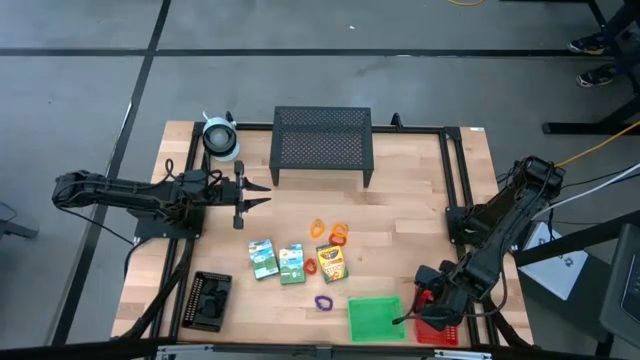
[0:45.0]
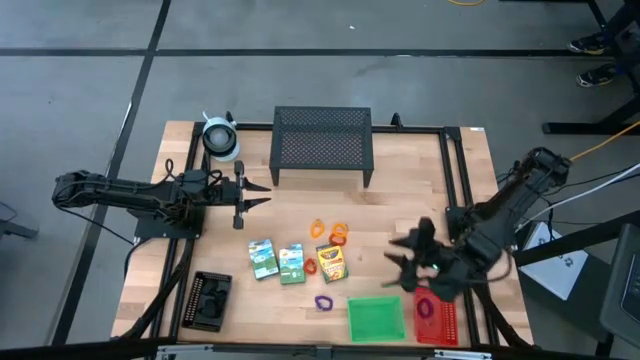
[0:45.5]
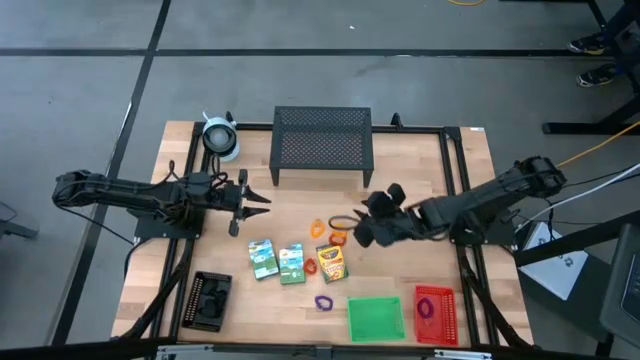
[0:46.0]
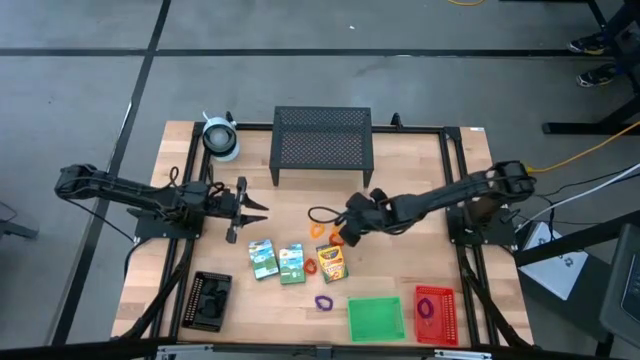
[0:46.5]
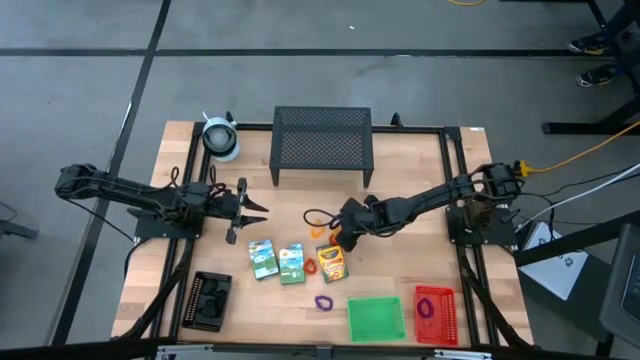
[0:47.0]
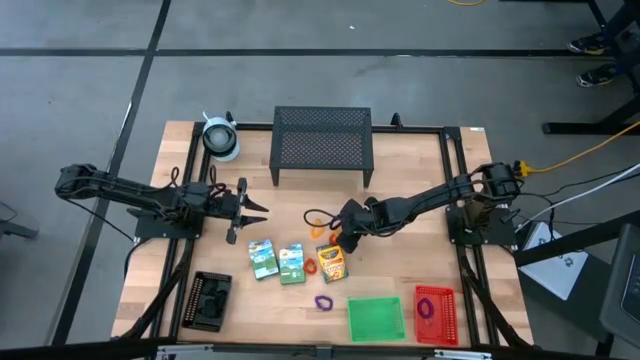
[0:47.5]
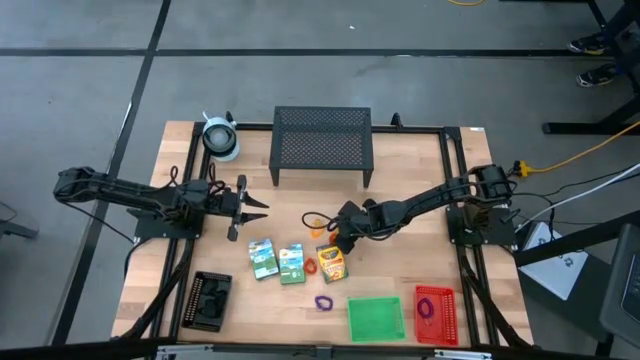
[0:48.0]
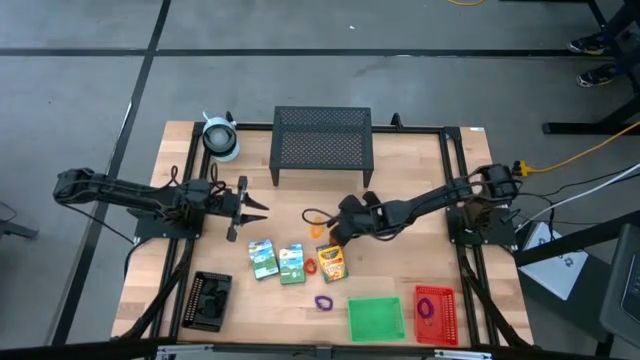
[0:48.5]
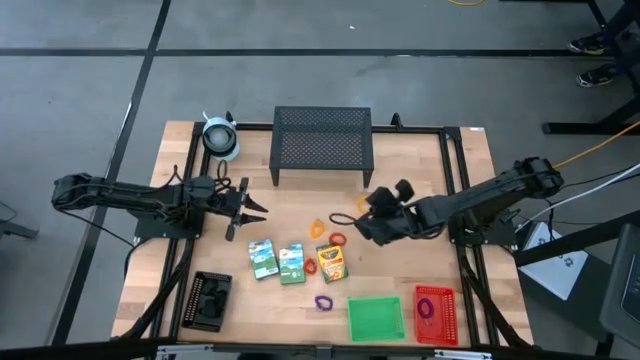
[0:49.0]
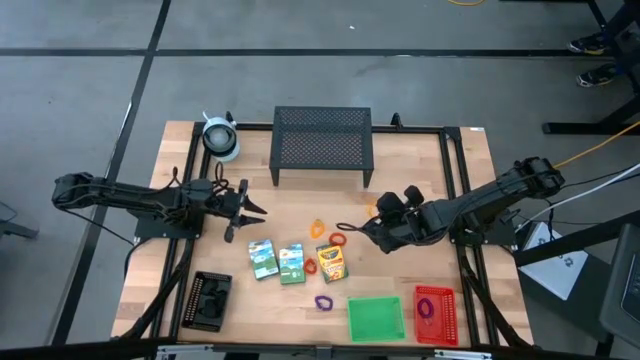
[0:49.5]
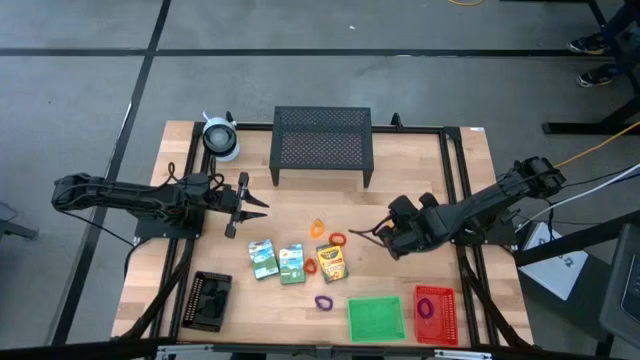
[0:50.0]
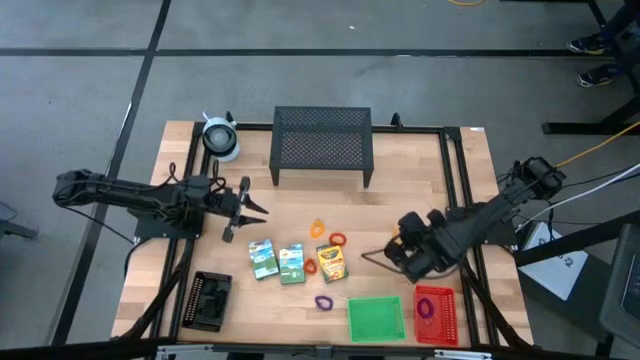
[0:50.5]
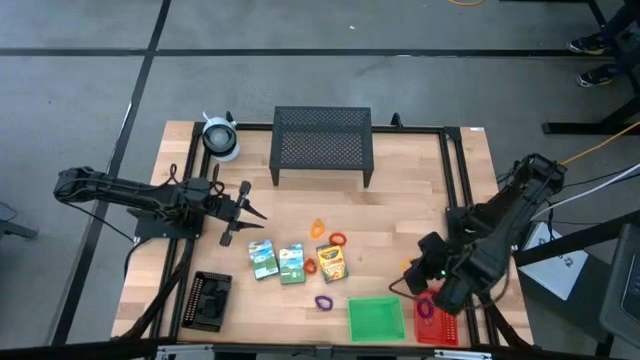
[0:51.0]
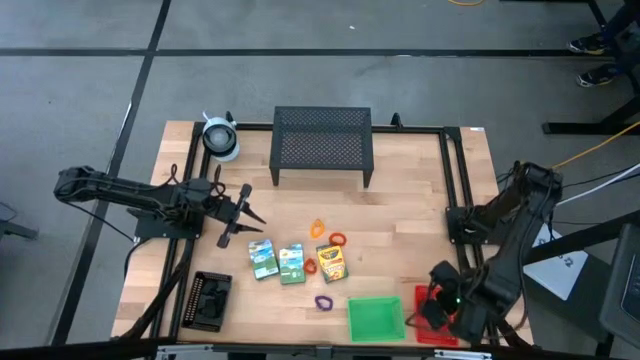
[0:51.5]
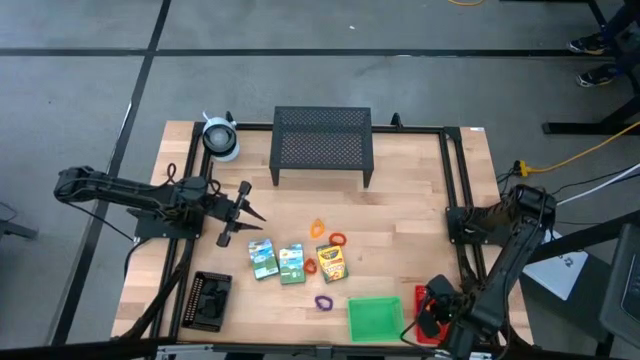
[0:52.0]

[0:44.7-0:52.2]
Task: Pick & Place Office Desk Supplies
Put the yellow spring keychain into the red bin

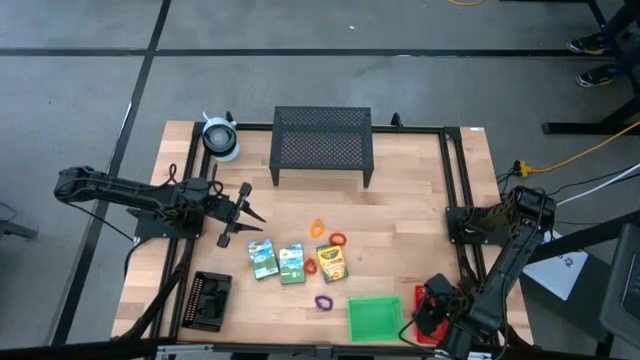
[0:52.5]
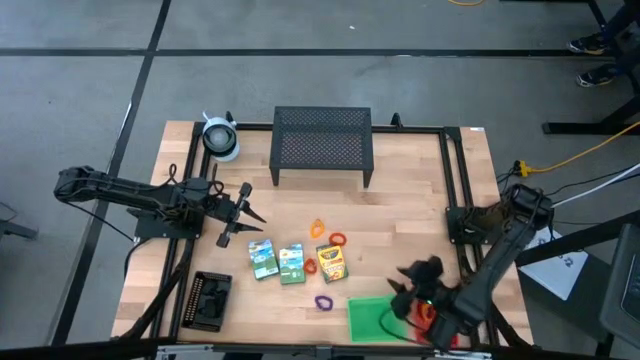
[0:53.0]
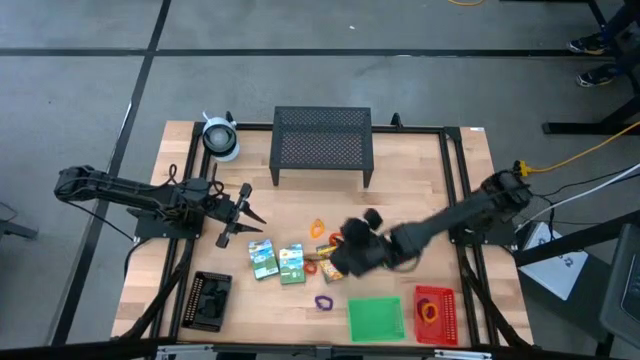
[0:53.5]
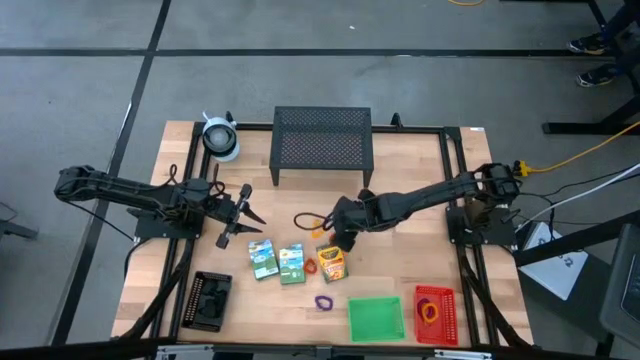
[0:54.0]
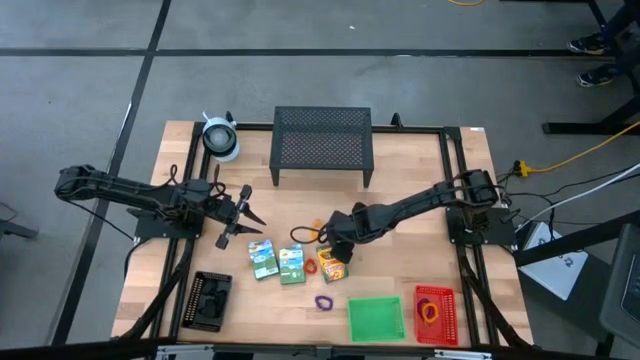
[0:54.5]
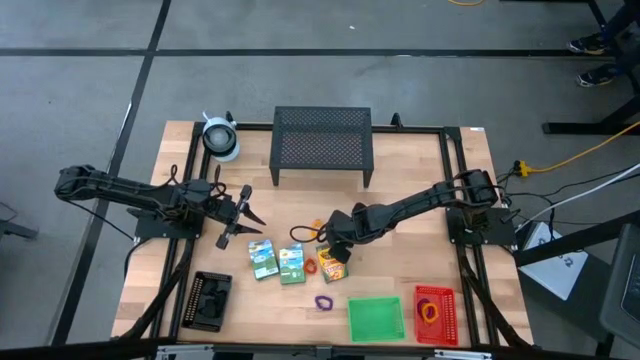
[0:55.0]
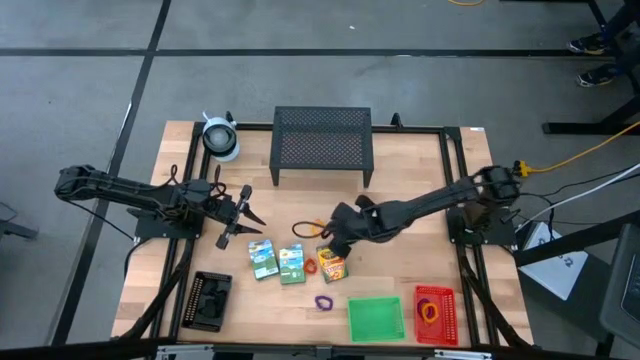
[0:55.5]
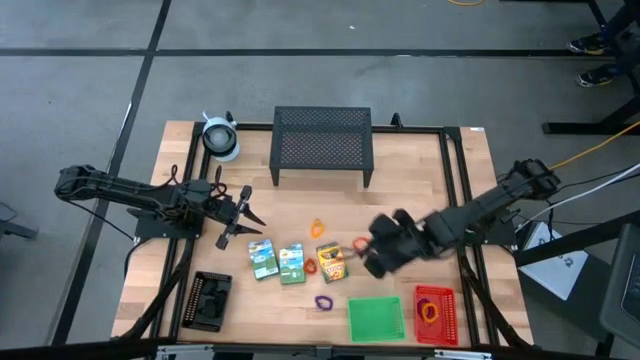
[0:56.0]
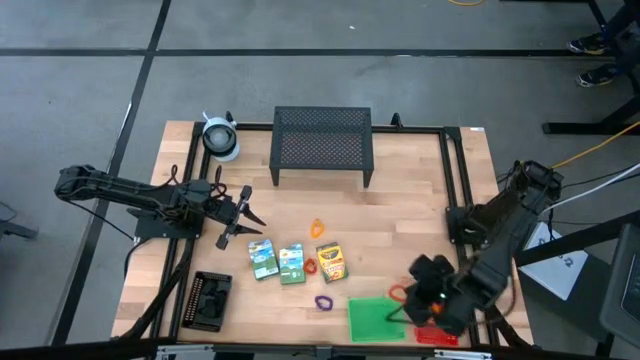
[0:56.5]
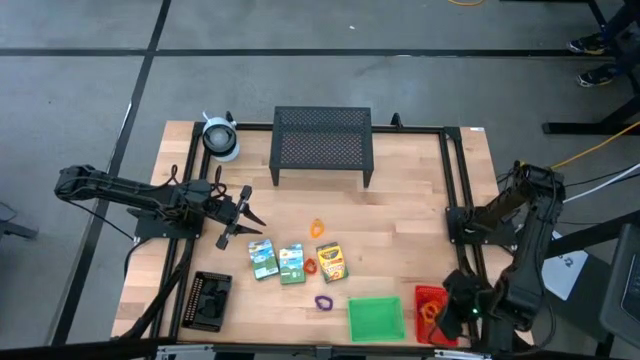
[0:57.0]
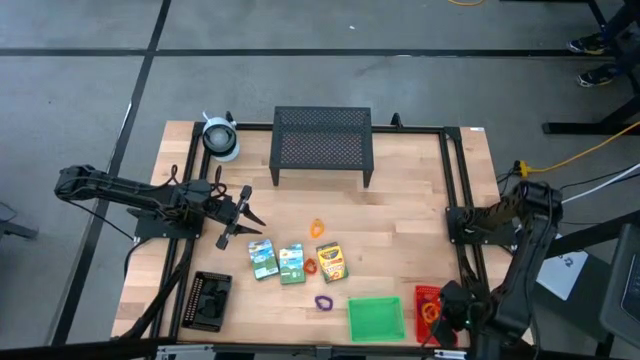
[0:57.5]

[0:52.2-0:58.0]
Put the orange spring keychain into the red bin

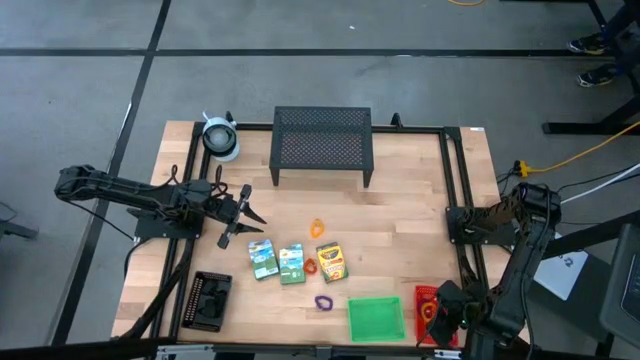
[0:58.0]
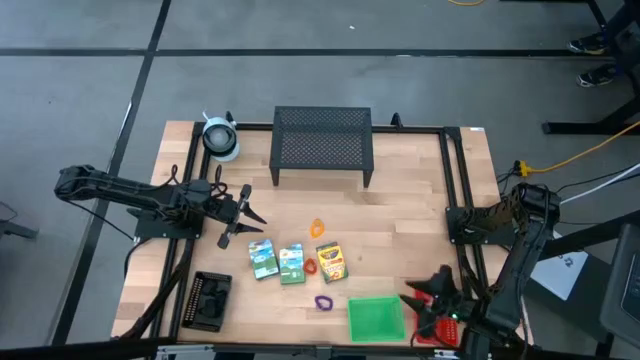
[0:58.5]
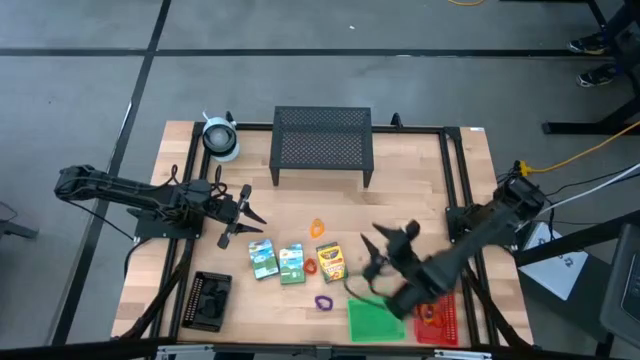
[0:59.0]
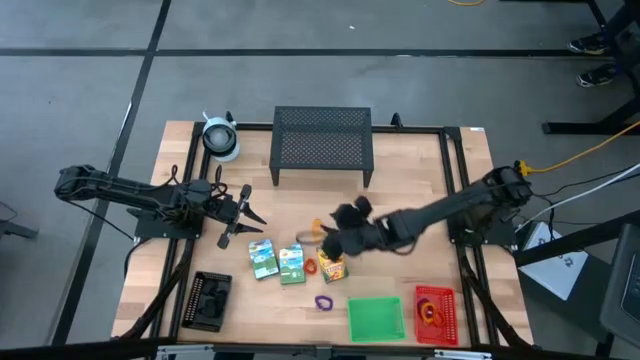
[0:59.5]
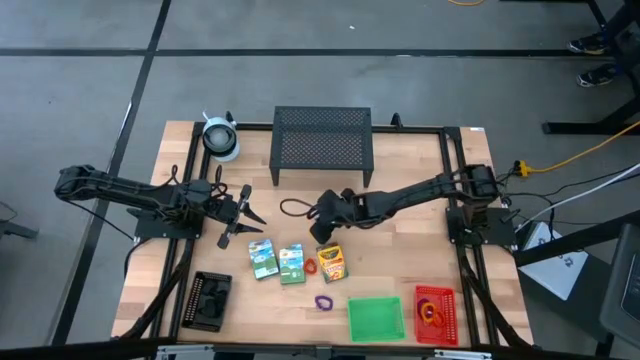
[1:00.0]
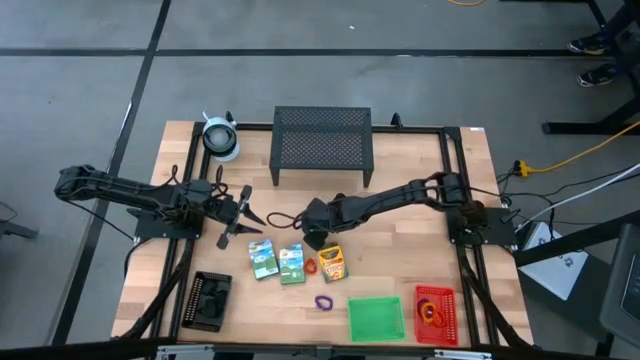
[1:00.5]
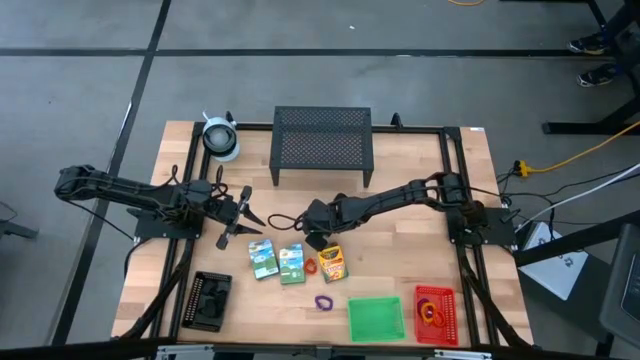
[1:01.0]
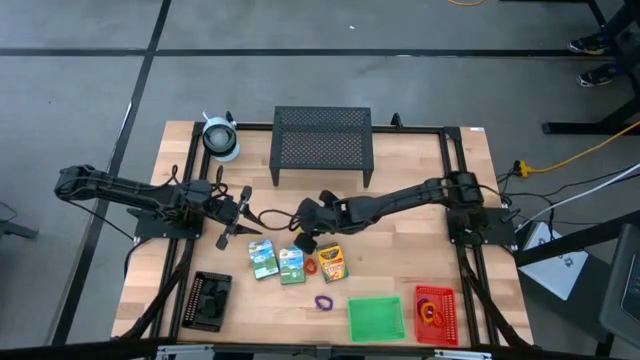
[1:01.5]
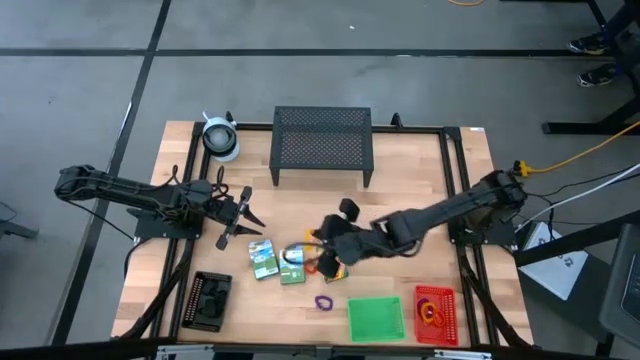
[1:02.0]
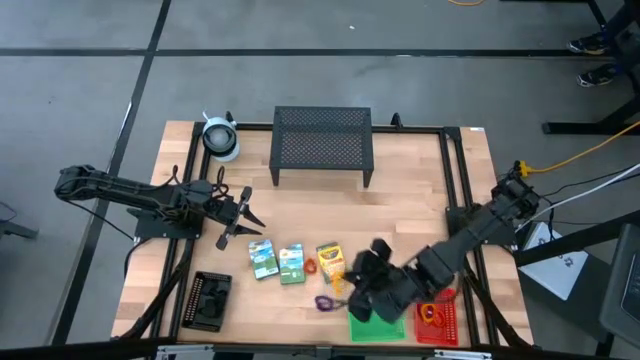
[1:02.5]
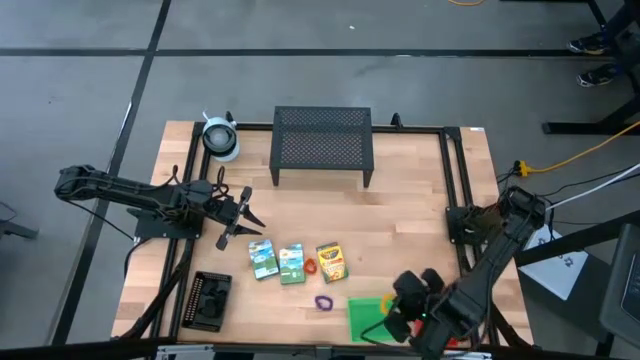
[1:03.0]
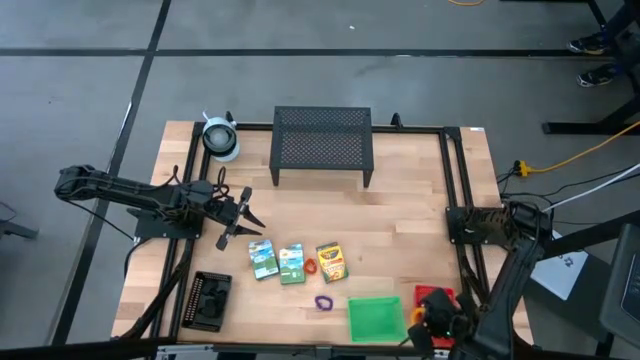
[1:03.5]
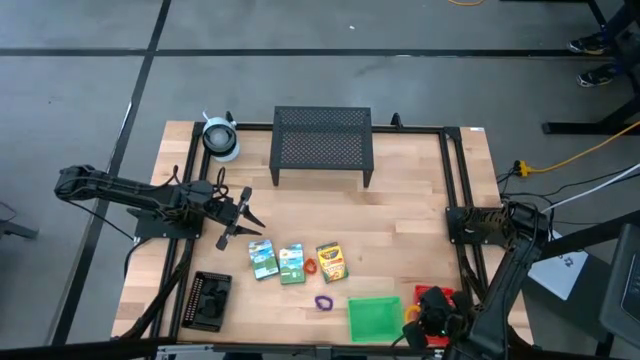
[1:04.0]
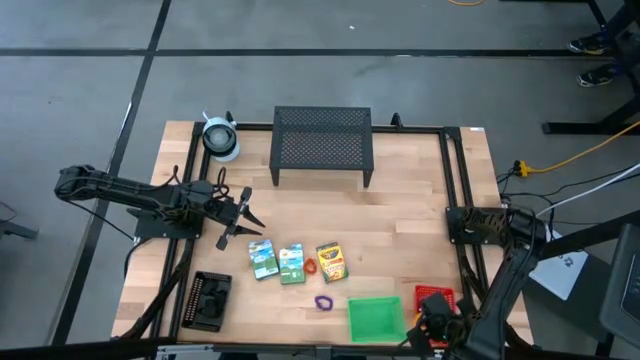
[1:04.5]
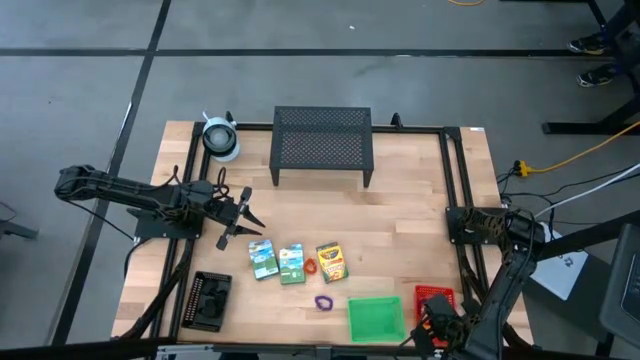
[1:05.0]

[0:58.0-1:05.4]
Put the yellow spring keychain into the red bin

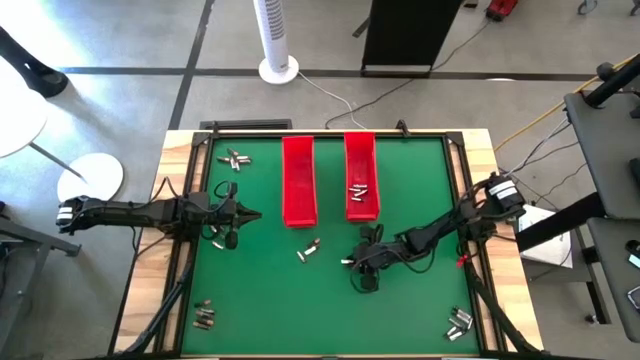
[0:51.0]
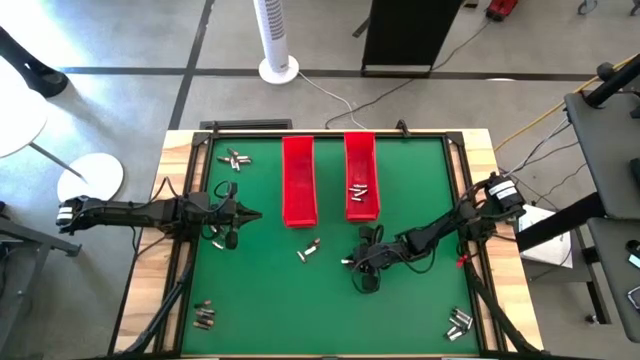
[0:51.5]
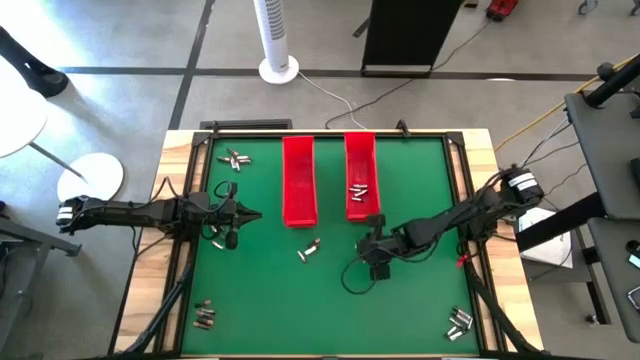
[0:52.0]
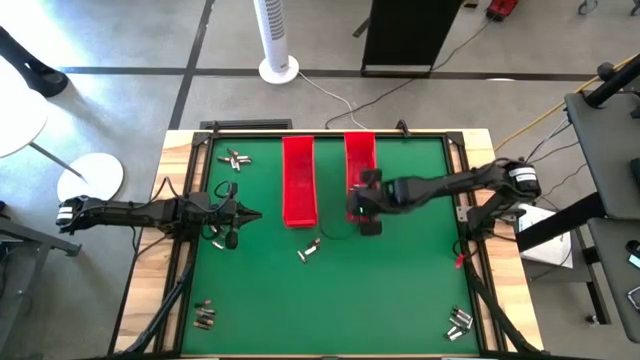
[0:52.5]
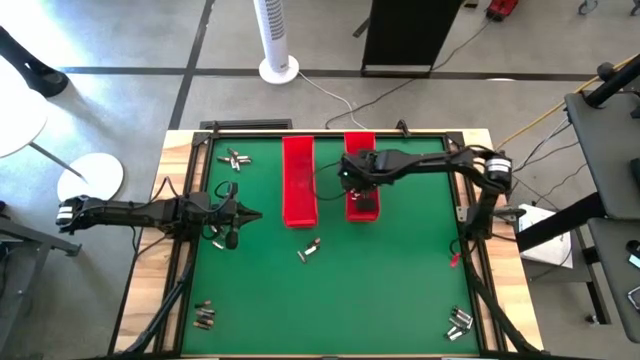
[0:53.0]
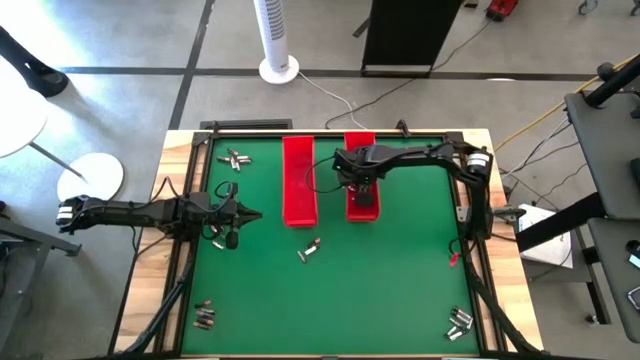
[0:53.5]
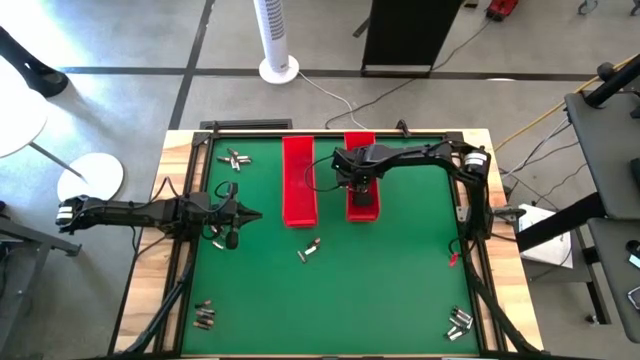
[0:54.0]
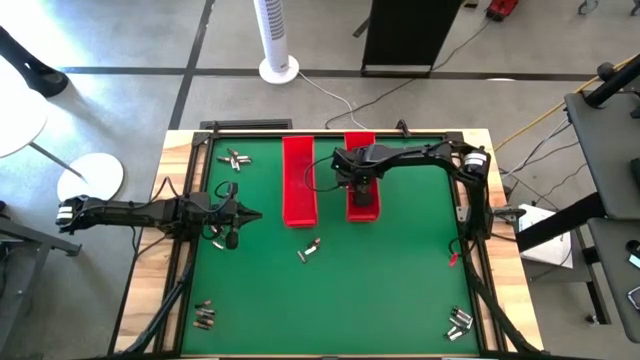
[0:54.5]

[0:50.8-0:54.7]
Task: Sort batteries
Put the silver battery into the right red bin
